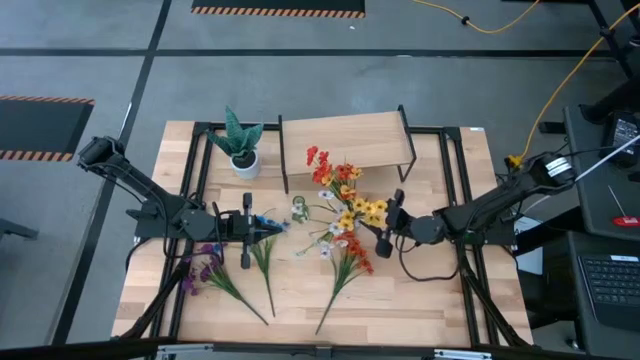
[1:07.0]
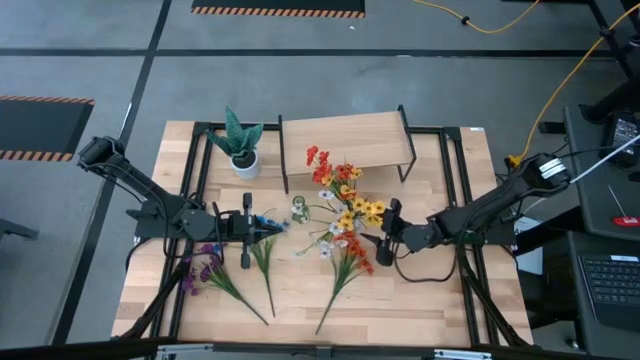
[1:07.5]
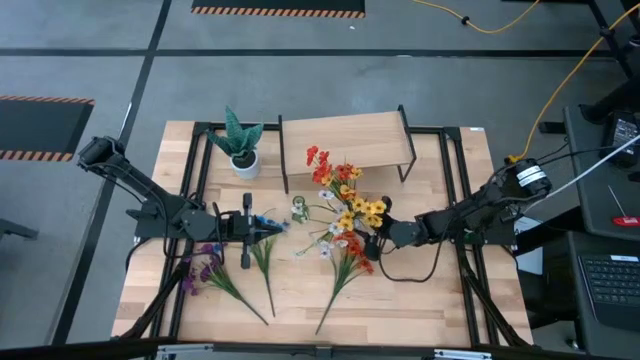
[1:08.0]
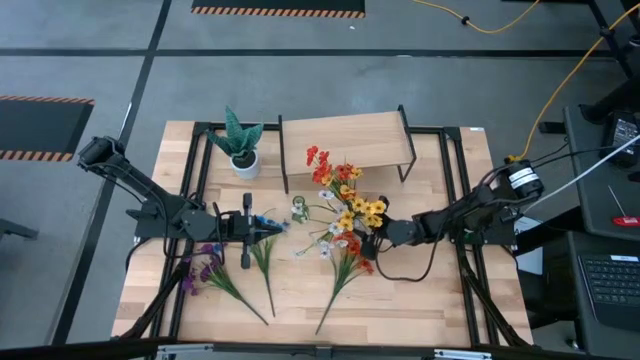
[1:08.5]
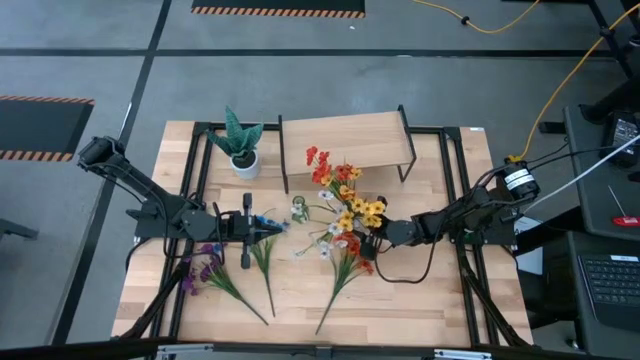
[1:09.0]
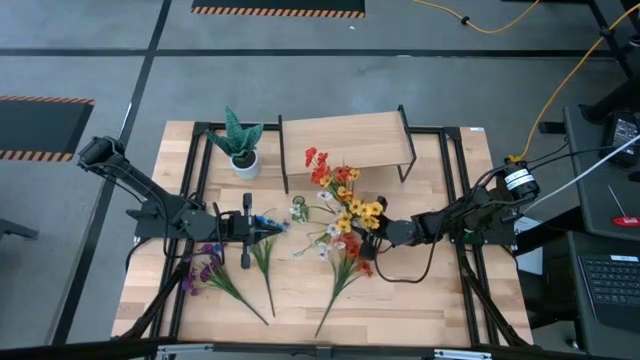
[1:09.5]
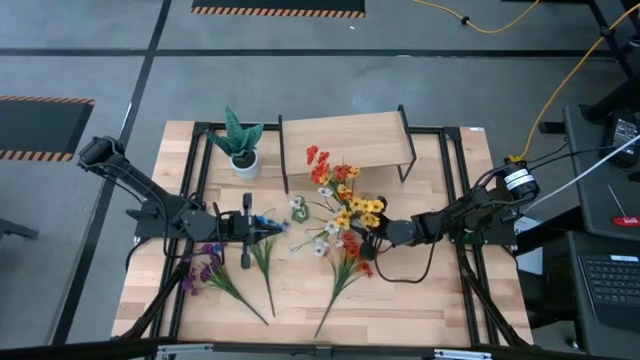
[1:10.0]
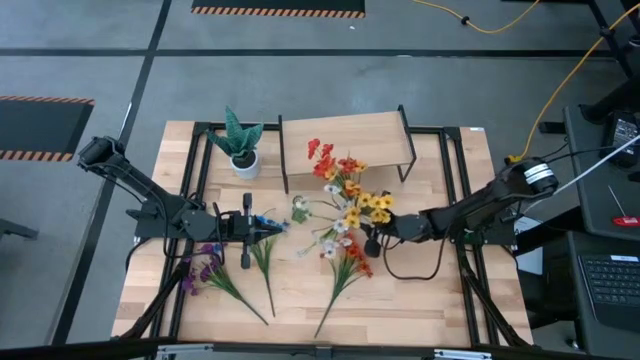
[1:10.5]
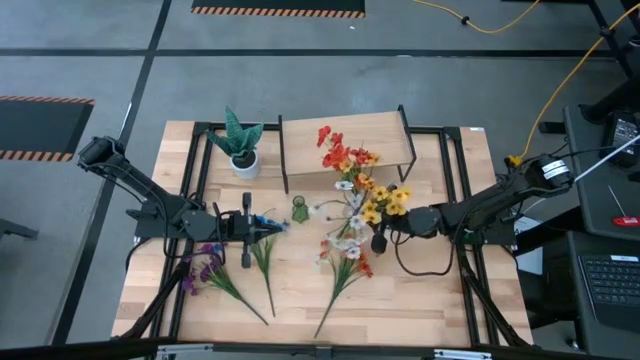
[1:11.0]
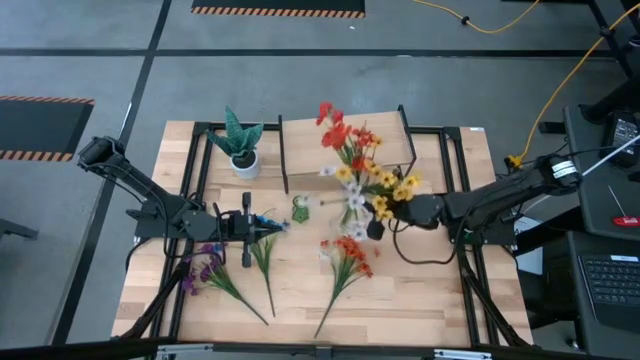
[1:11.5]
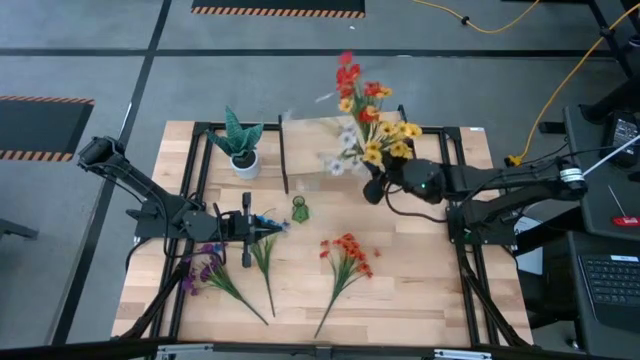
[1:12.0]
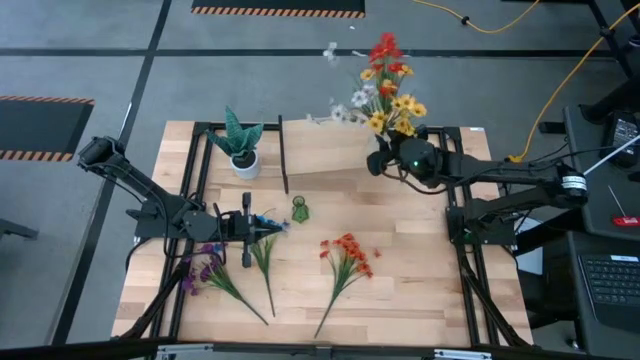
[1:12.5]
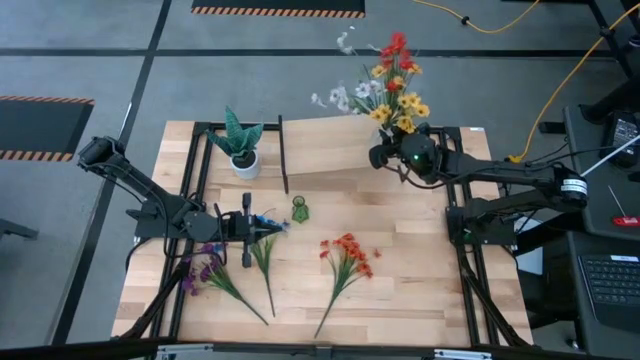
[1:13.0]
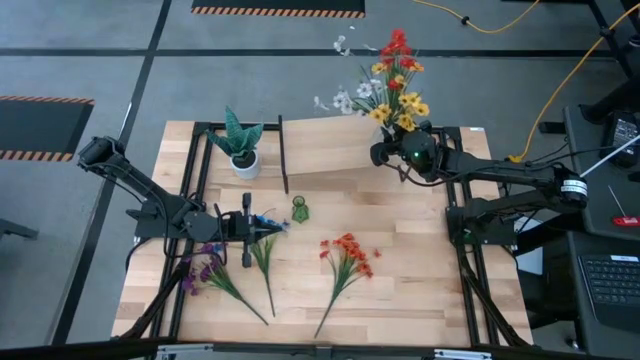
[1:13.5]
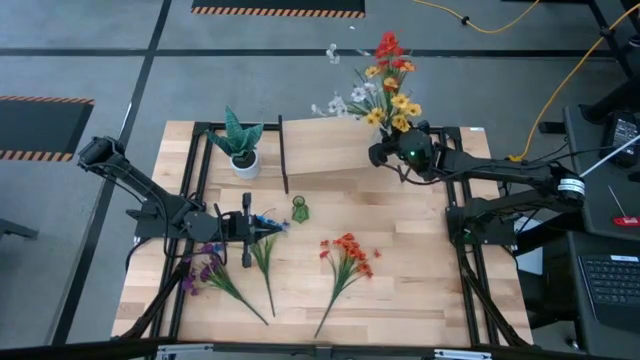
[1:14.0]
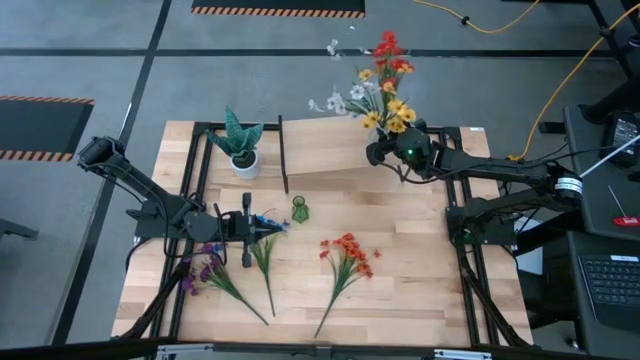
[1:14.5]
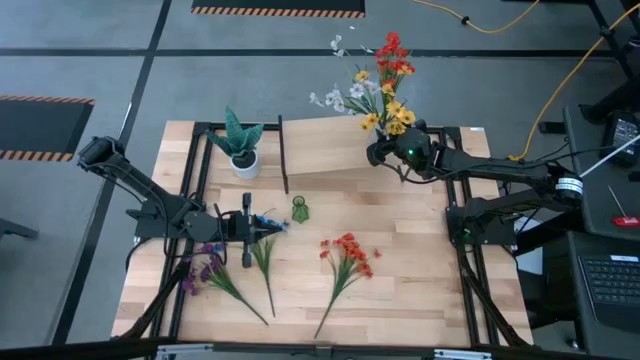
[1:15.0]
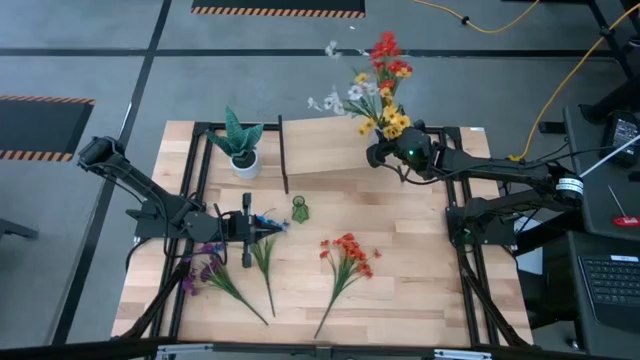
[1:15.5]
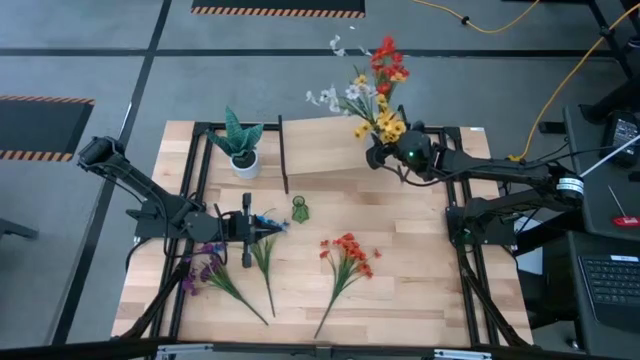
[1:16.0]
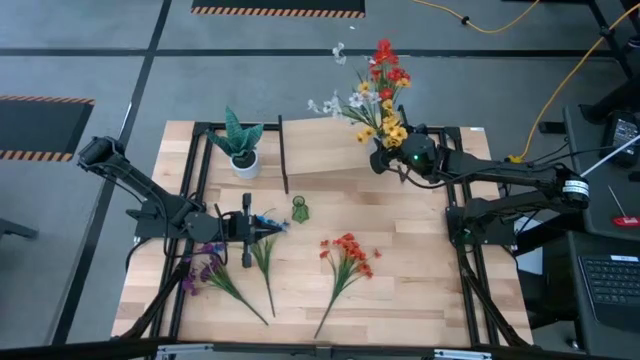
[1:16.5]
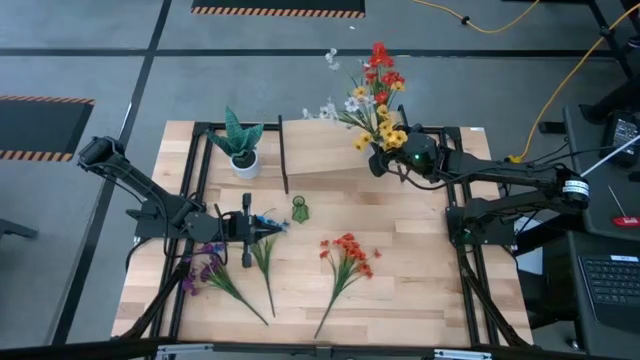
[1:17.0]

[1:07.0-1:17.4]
Task: Pick and place flowers into a vace then onto a shelf
Put the transparent vase on the shelf

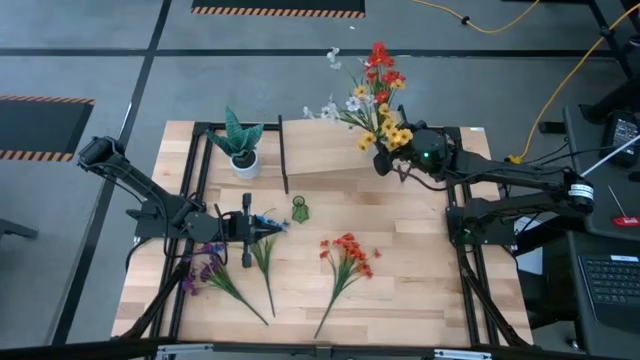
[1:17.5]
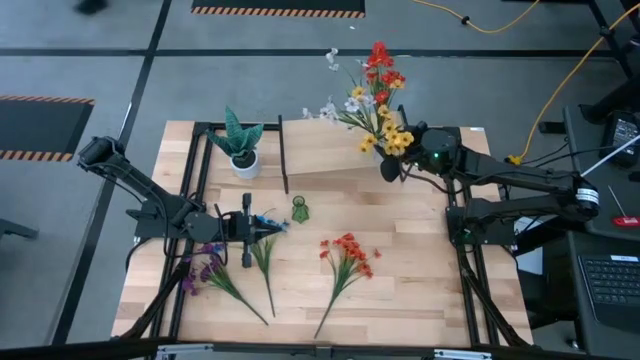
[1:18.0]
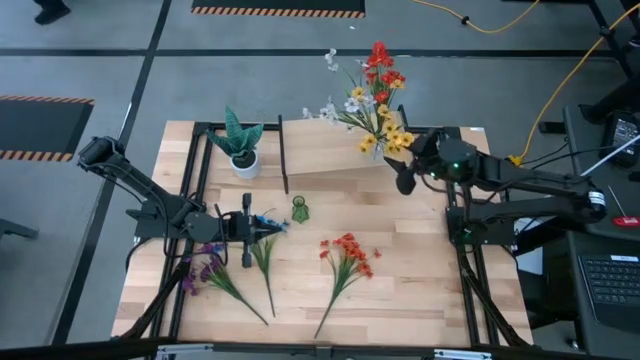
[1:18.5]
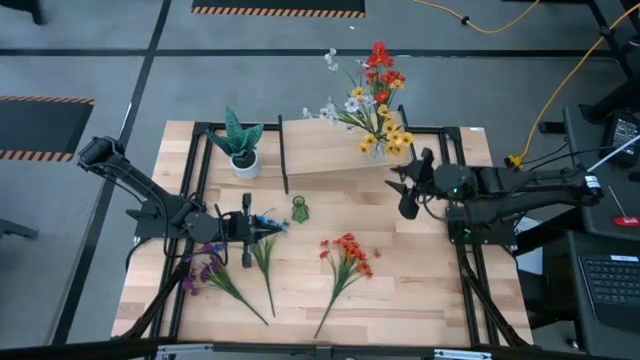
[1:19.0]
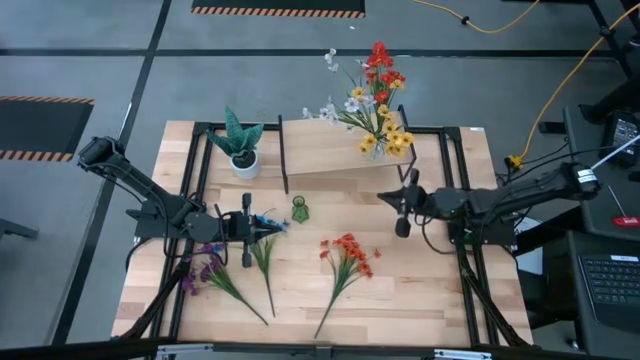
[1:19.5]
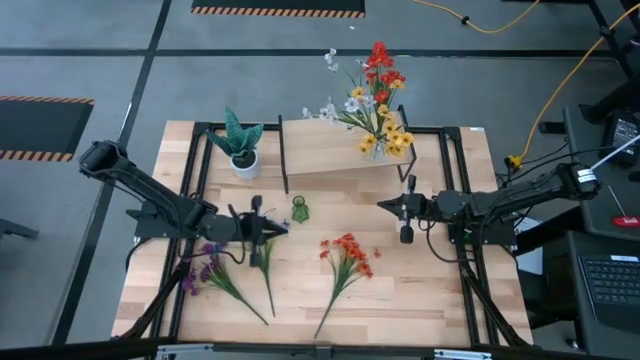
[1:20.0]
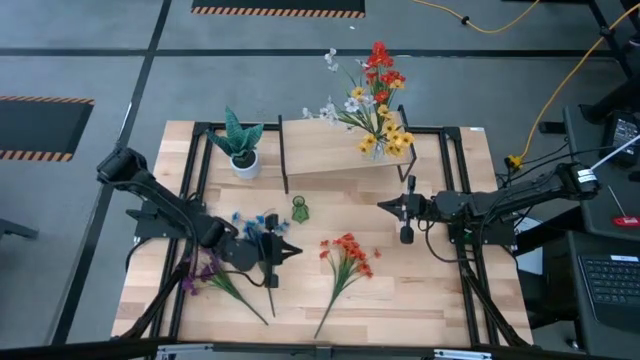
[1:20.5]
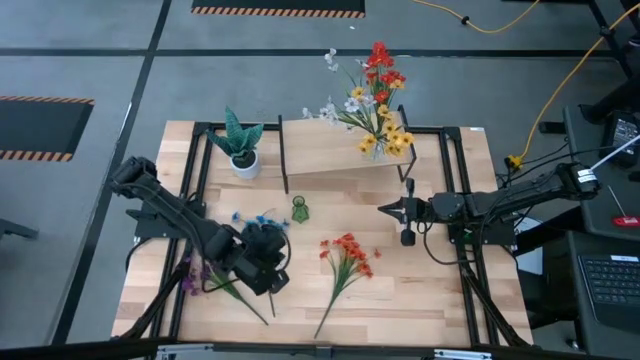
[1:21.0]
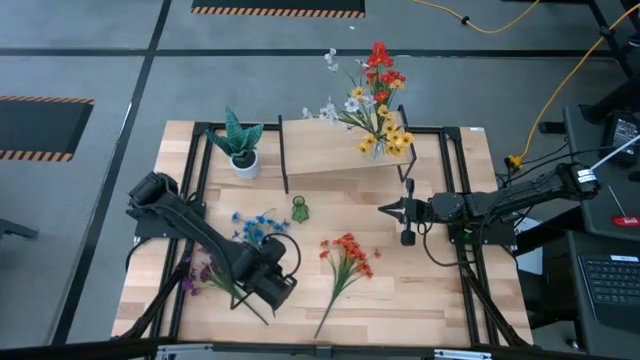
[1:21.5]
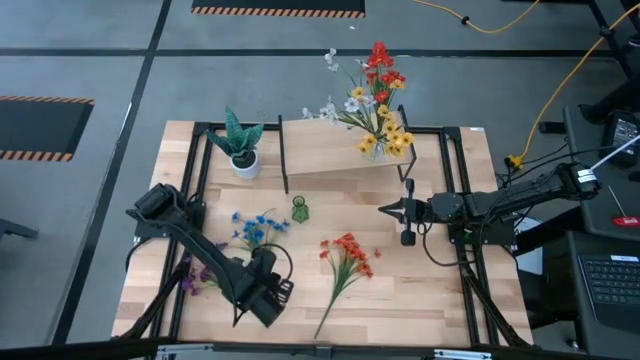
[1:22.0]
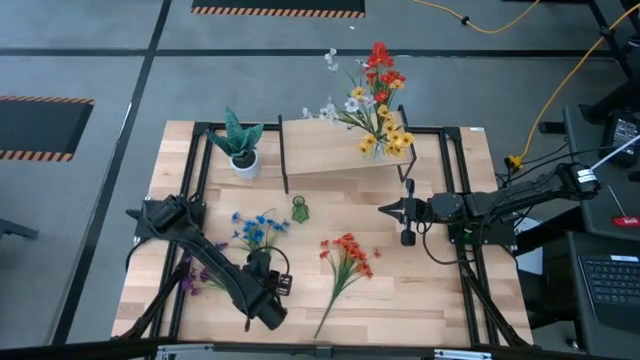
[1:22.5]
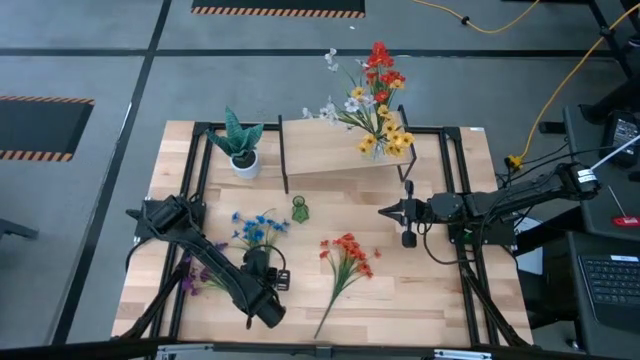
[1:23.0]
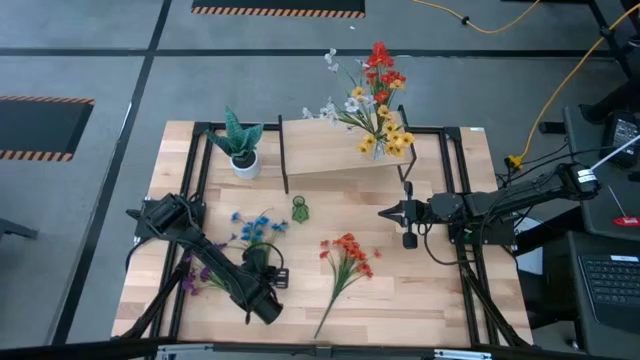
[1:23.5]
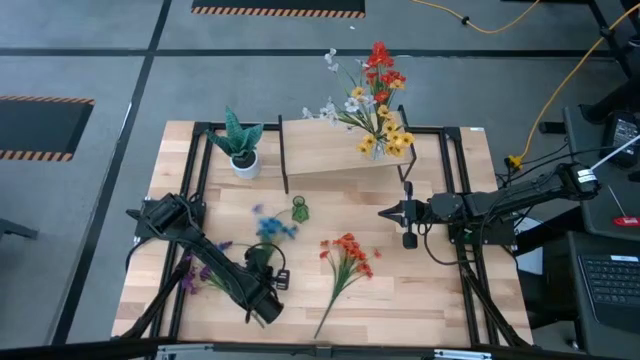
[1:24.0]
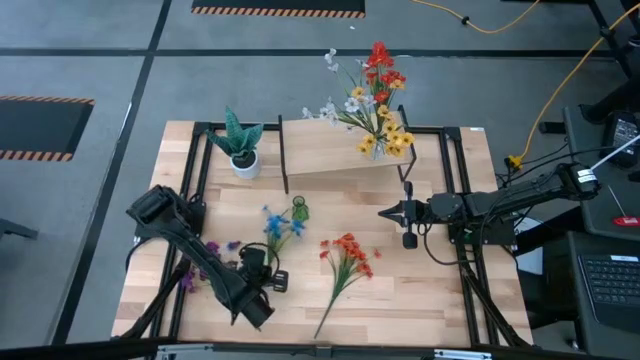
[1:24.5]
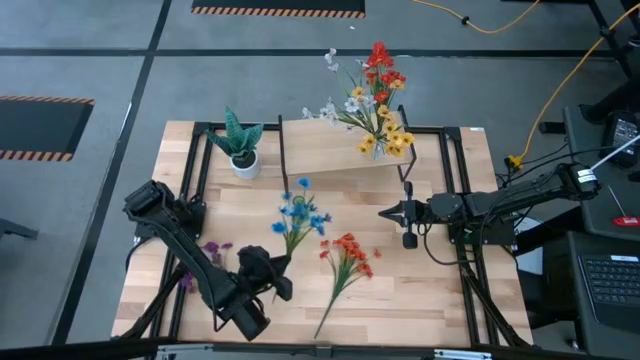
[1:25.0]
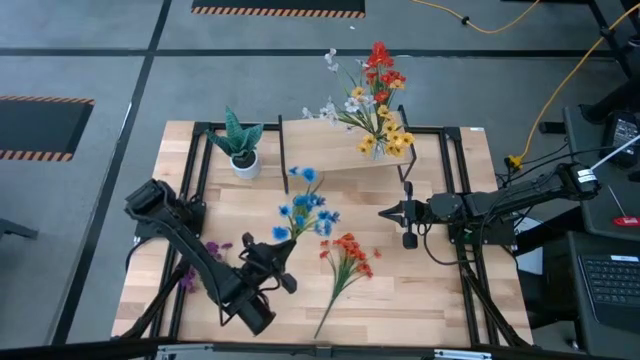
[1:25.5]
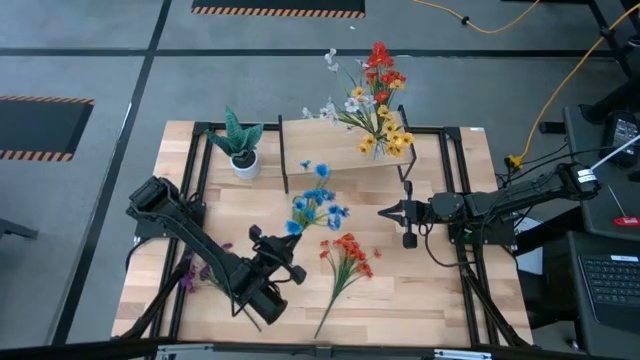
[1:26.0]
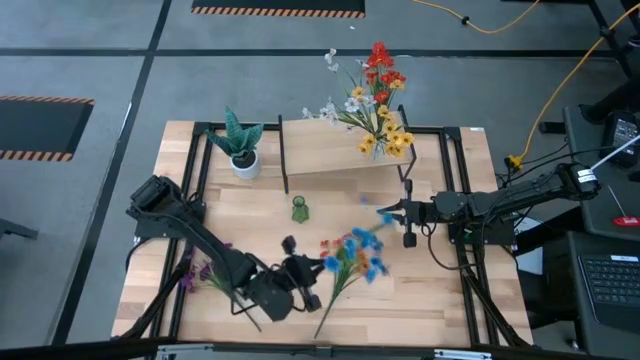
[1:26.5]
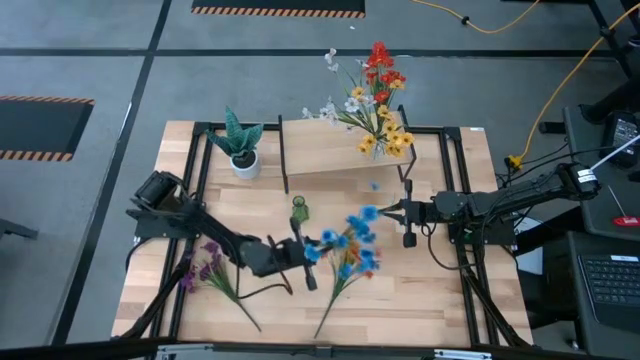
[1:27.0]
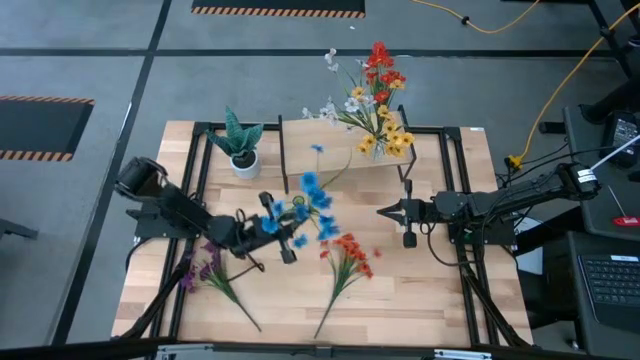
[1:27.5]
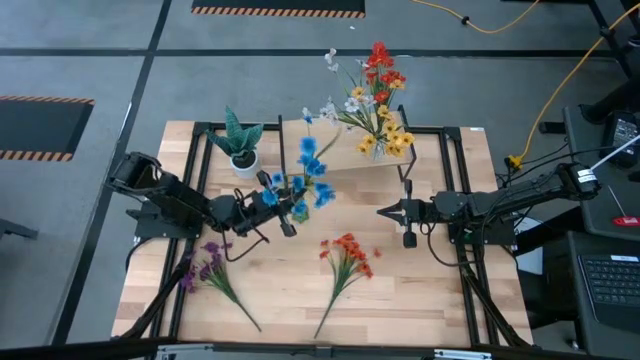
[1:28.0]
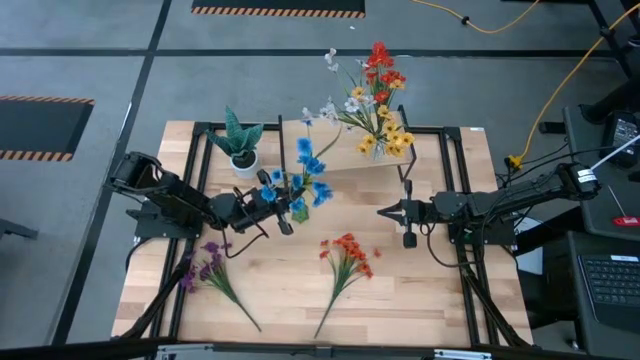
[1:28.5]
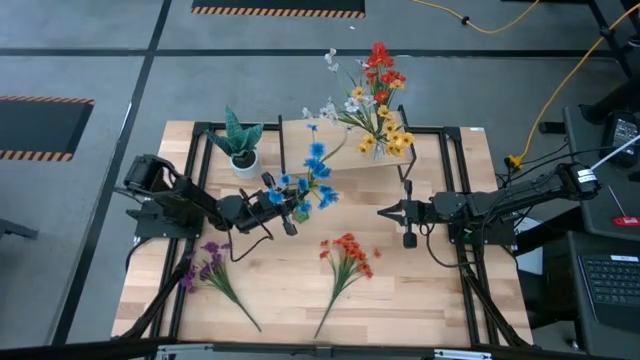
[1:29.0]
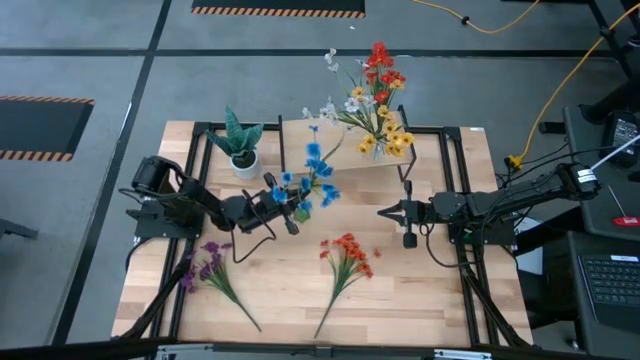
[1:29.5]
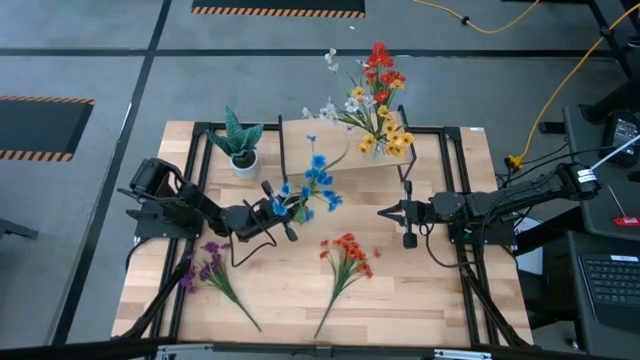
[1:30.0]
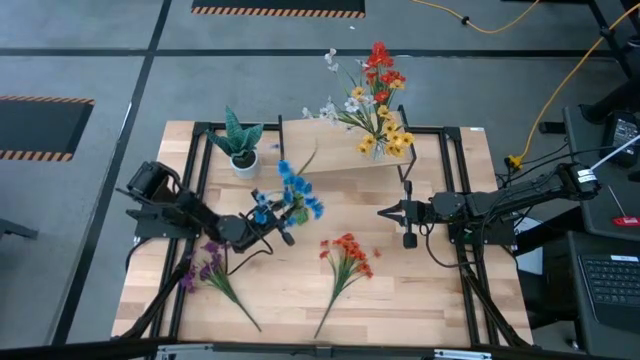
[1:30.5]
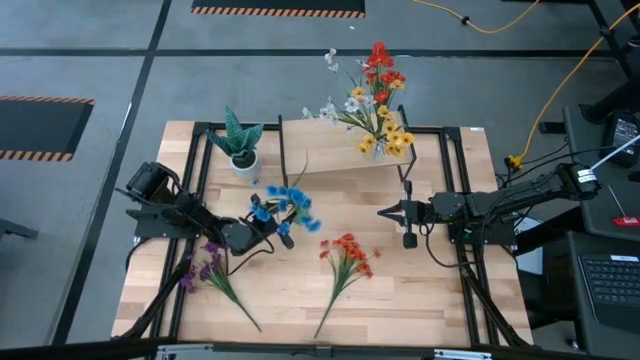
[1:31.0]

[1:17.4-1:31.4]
Put the blue flowers into the green transparent vase
